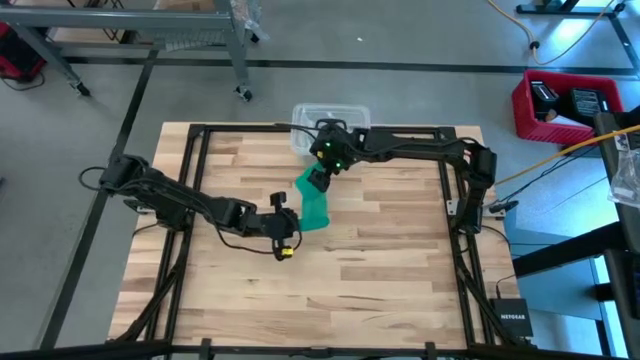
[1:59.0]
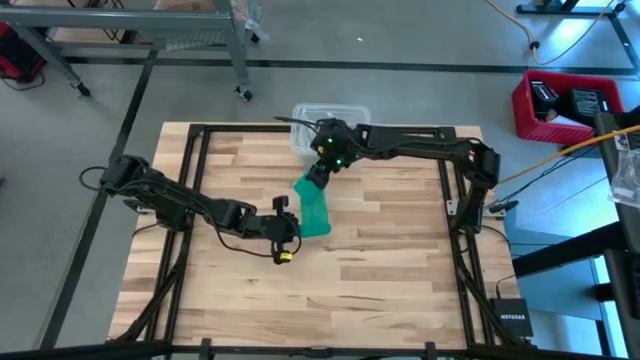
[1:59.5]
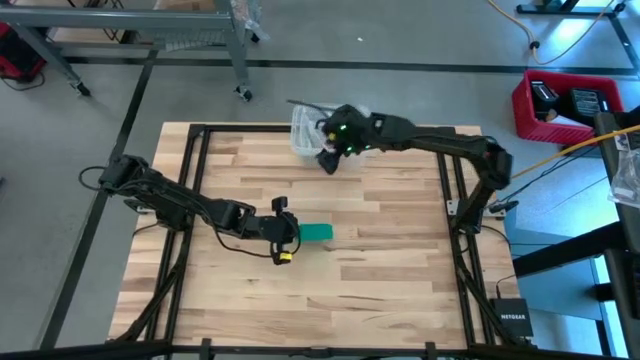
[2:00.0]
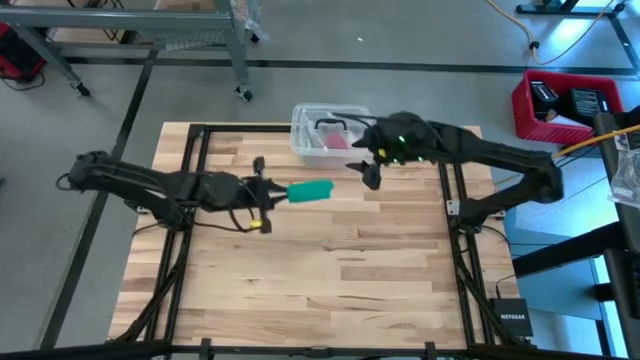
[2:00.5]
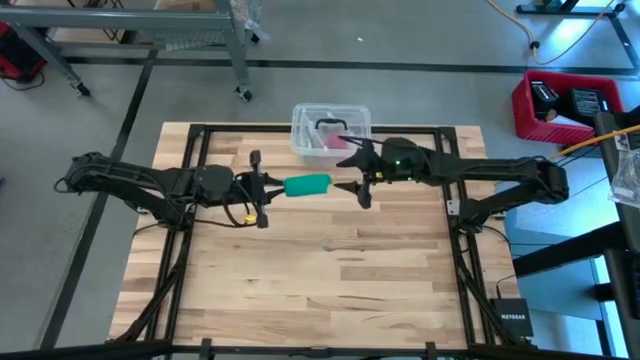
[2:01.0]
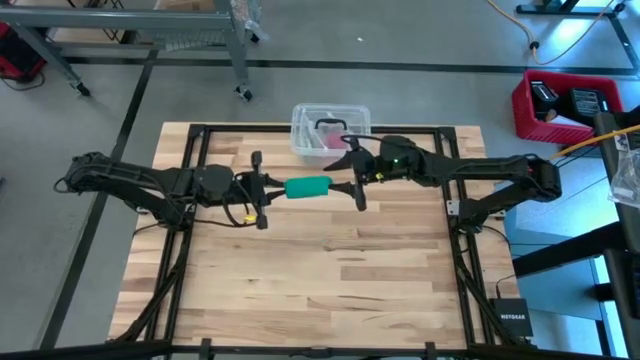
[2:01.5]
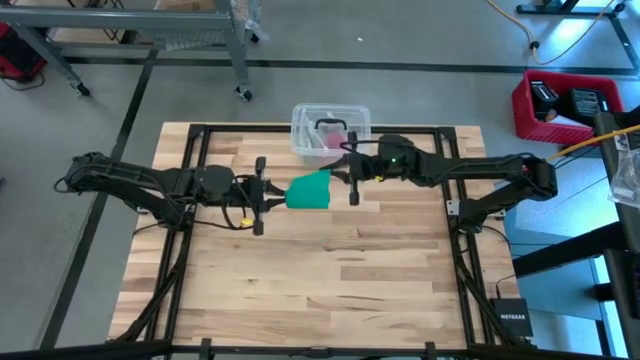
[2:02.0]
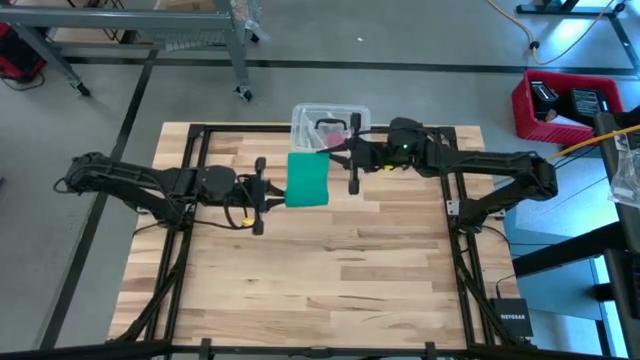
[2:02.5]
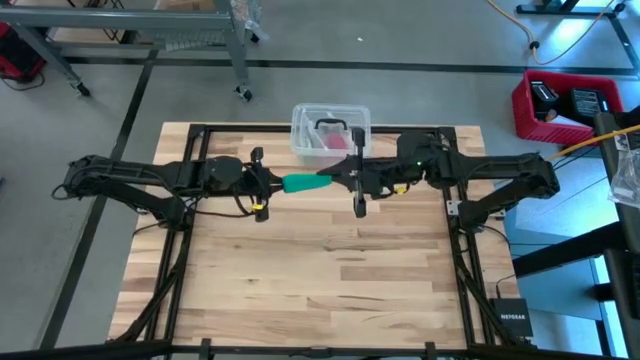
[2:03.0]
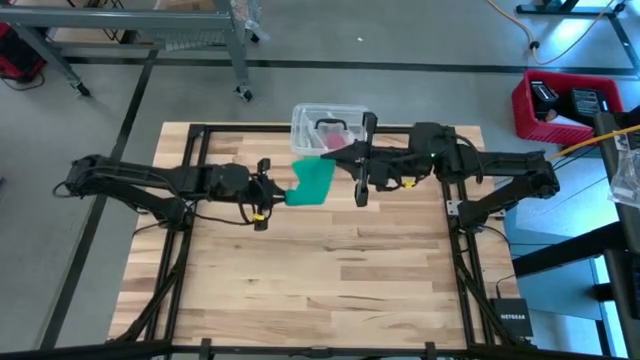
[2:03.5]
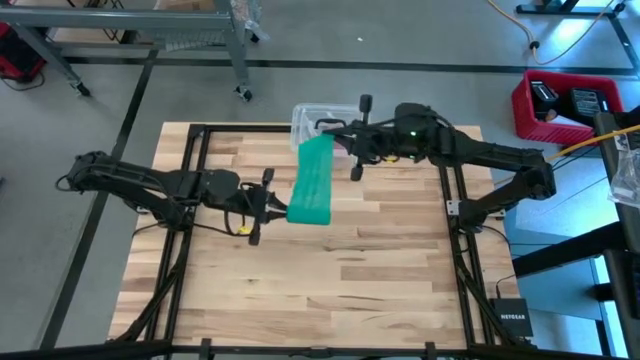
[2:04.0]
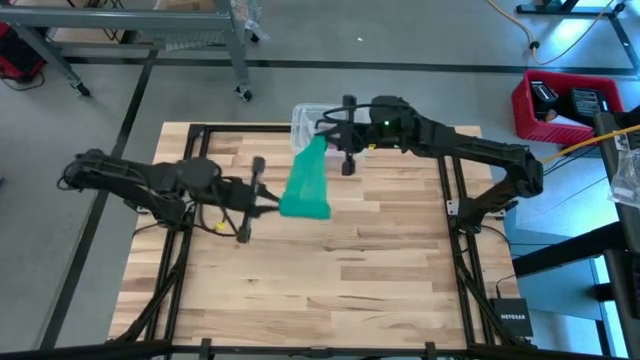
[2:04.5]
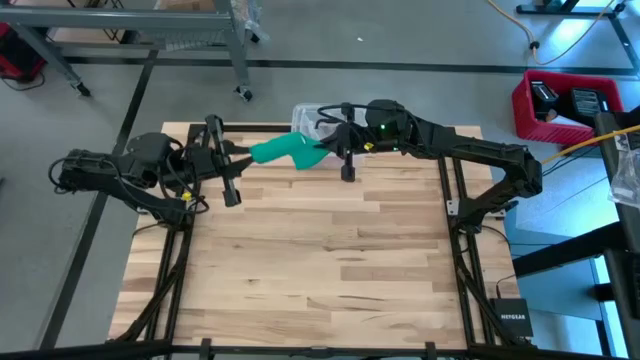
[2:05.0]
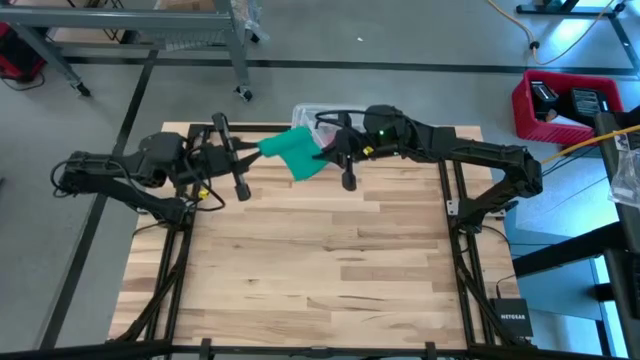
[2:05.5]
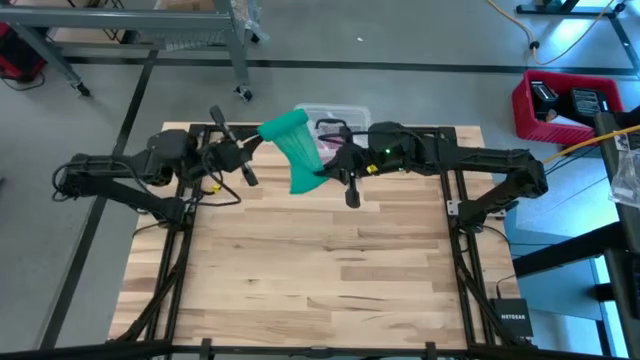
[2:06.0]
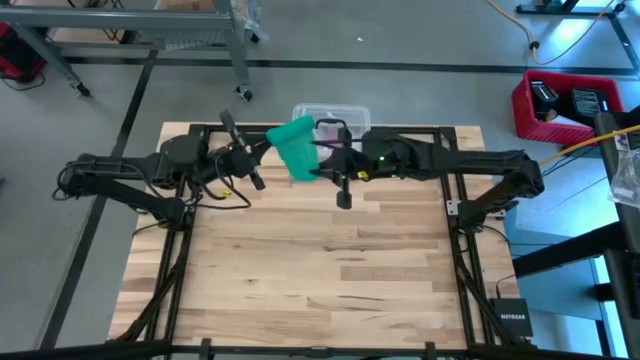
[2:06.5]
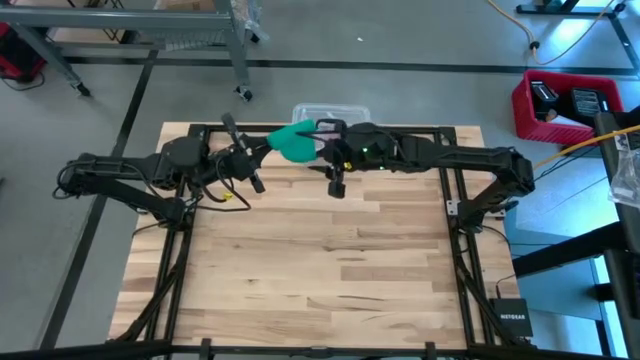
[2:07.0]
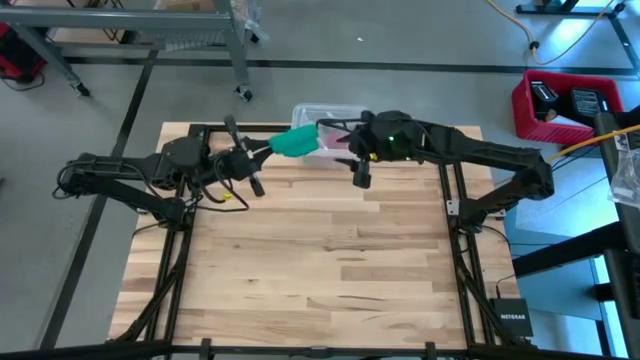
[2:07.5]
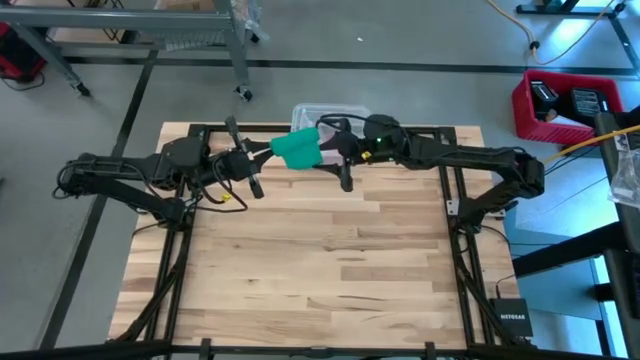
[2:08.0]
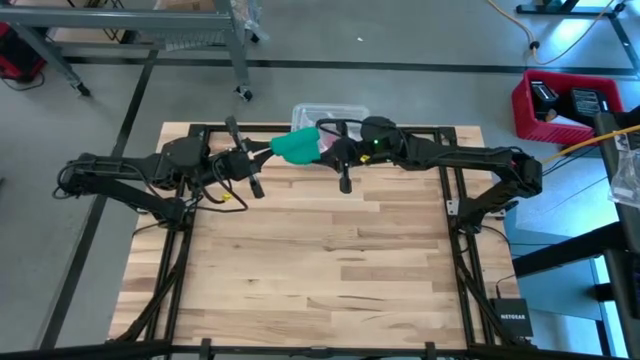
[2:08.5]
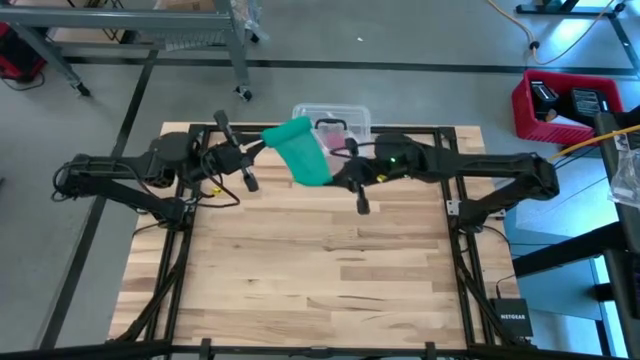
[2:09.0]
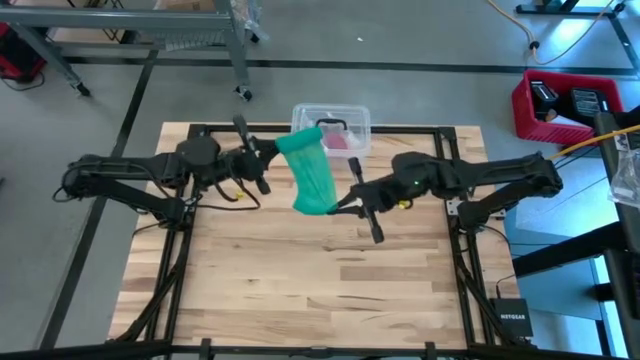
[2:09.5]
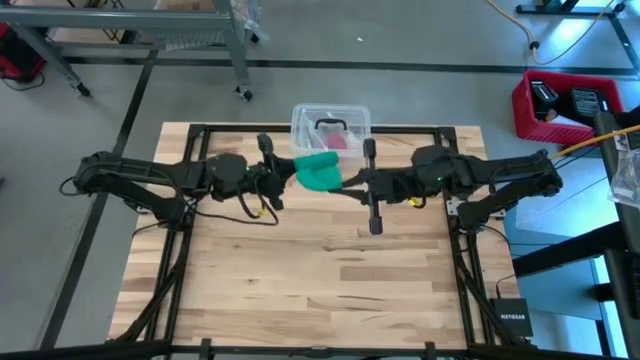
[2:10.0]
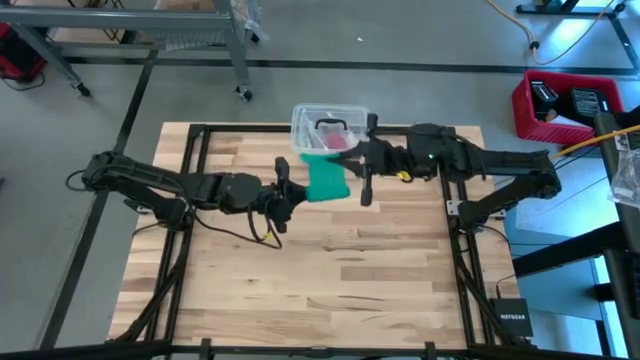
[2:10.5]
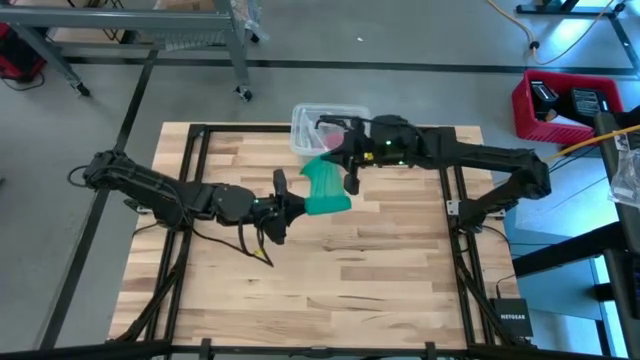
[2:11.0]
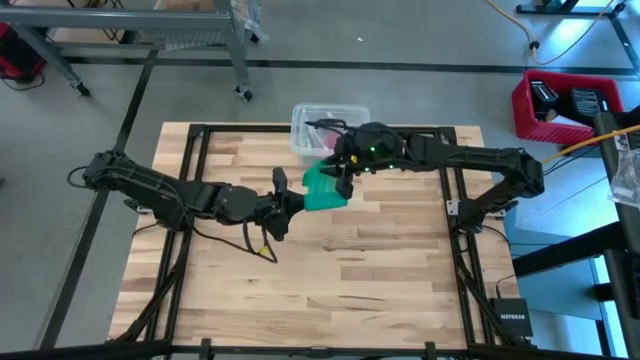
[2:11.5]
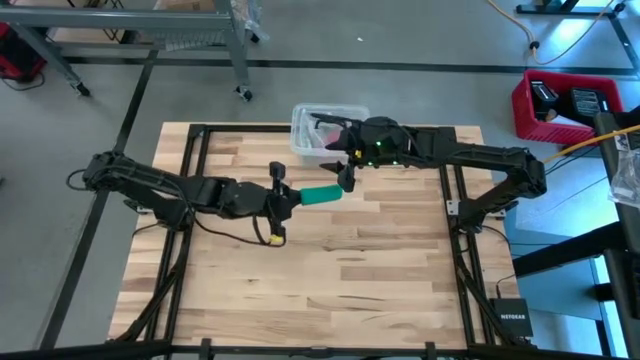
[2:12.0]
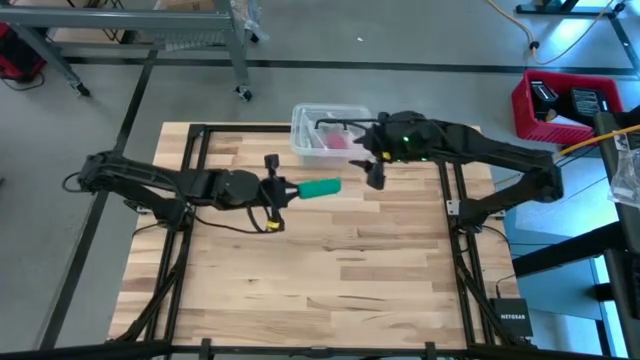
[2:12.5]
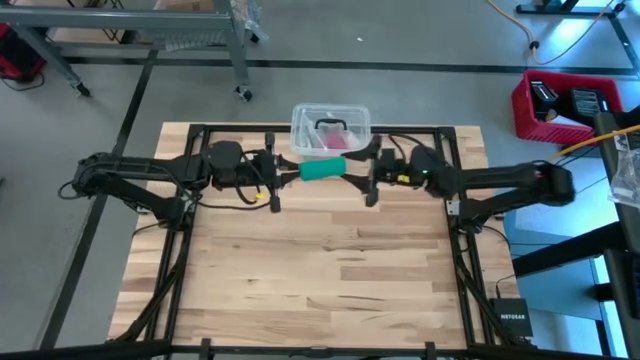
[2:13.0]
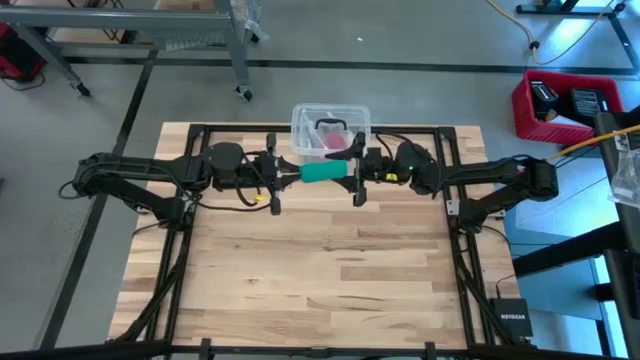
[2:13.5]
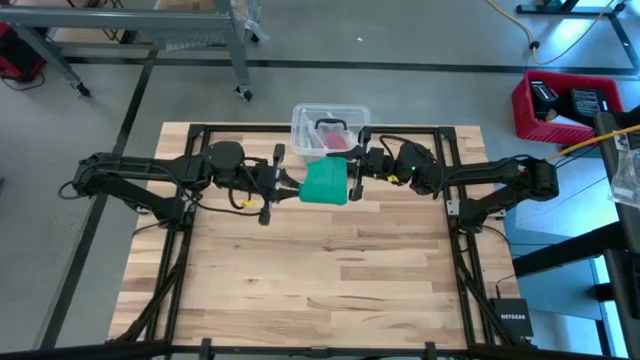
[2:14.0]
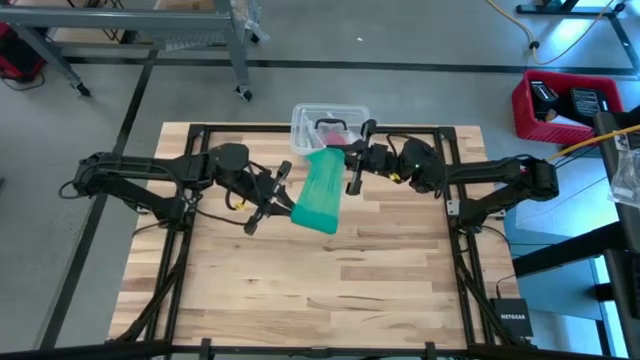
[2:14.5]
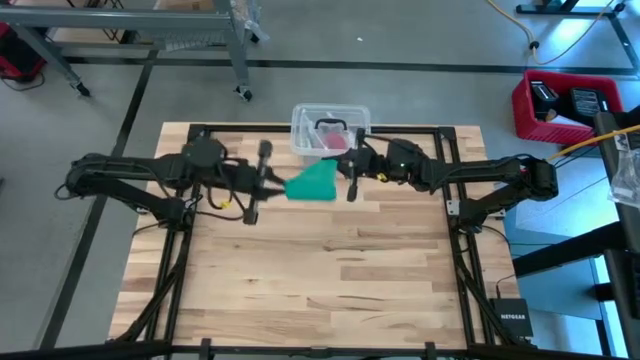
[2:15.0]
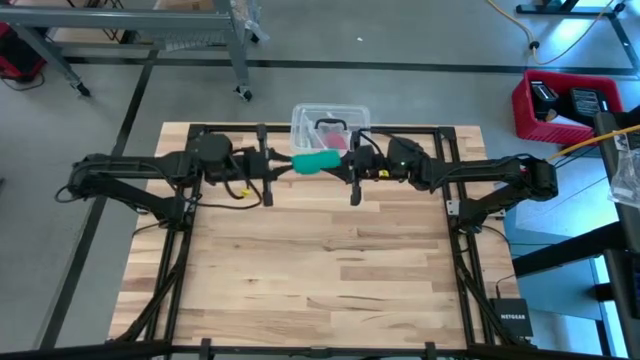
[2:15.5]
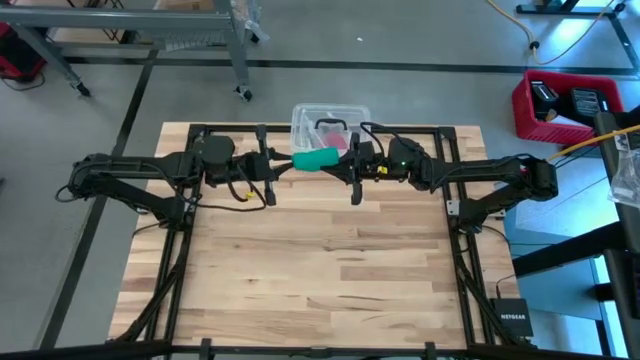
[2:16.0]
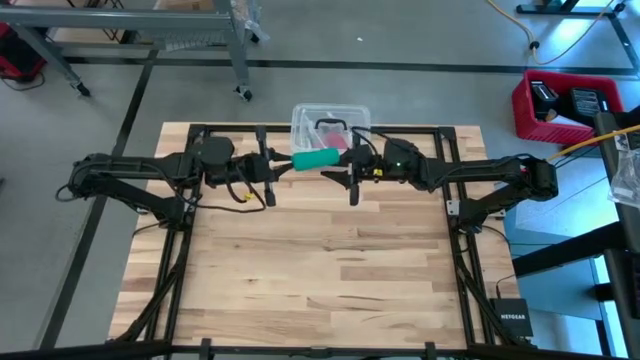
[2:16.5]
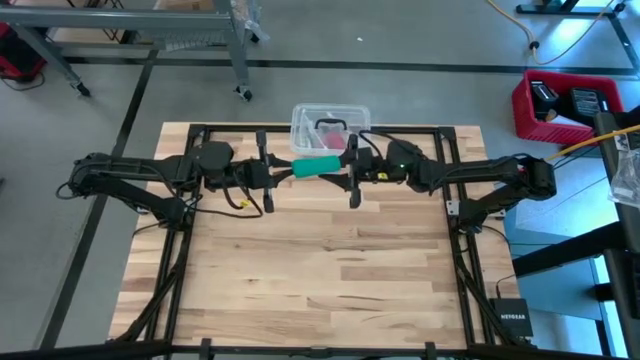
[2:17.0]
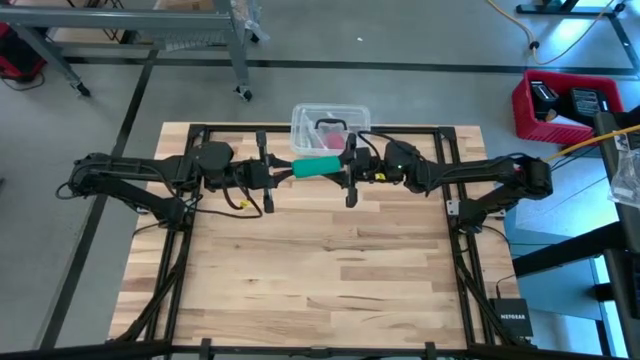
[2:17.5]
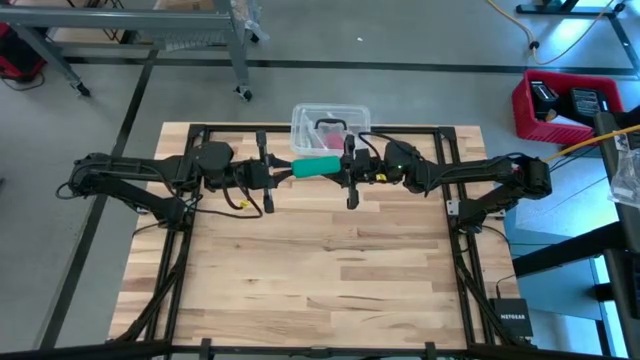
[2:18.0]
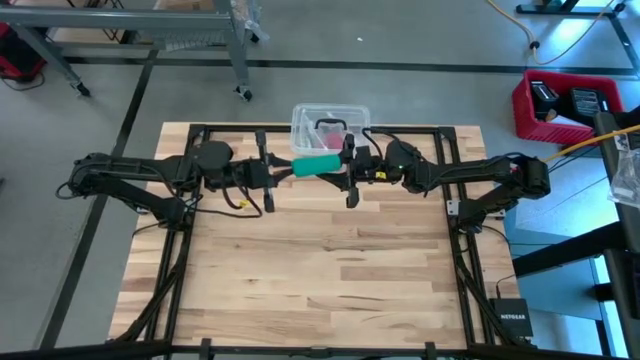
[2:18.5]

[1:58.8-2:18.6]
Task: Roll bandage
Roll the green bandage

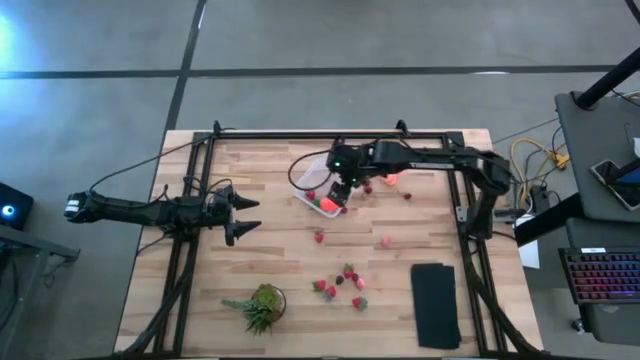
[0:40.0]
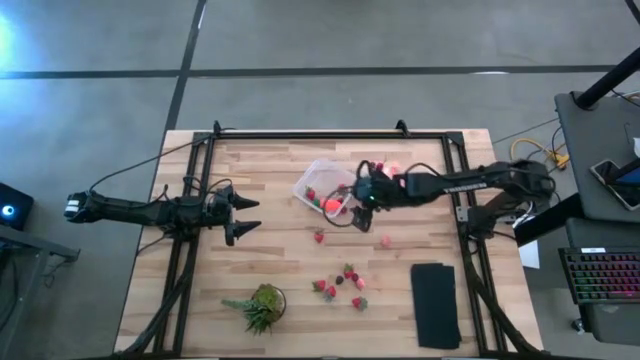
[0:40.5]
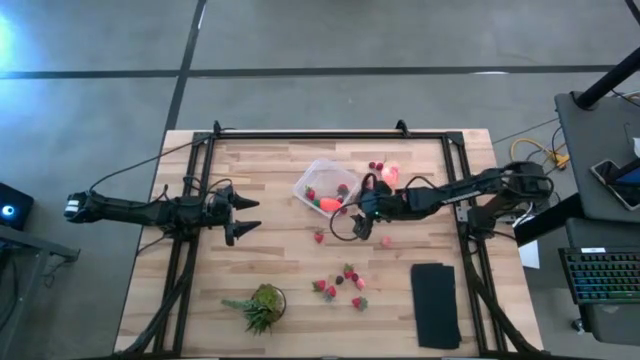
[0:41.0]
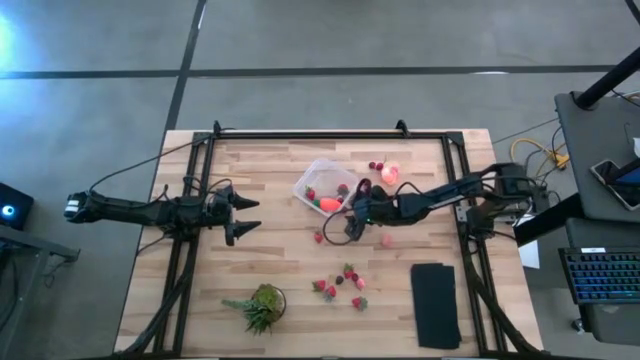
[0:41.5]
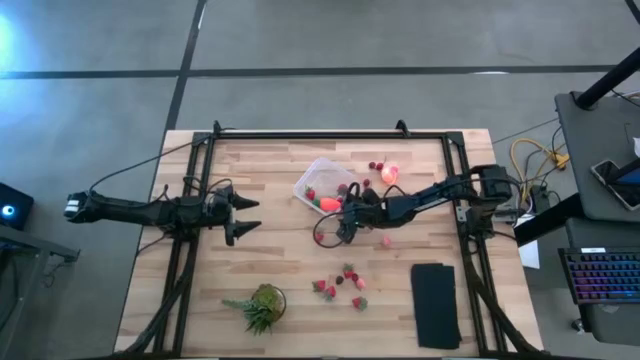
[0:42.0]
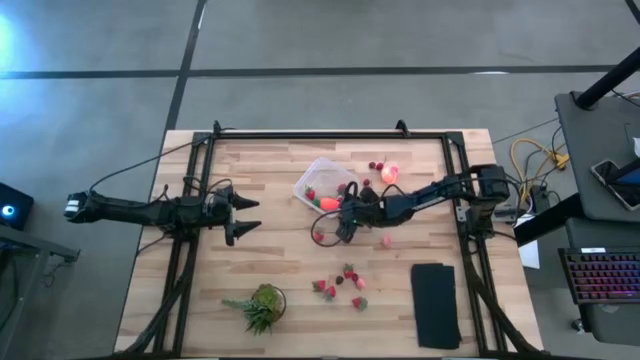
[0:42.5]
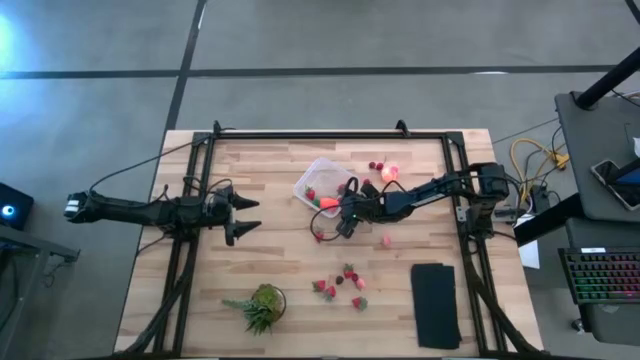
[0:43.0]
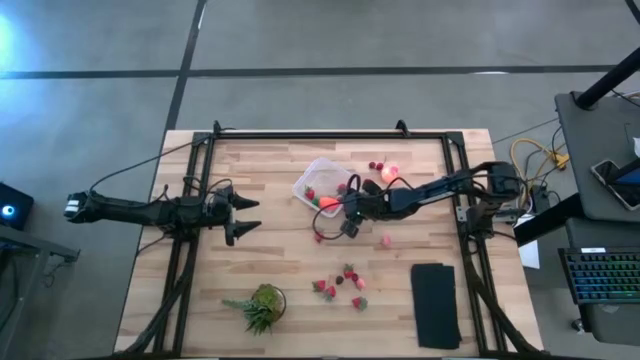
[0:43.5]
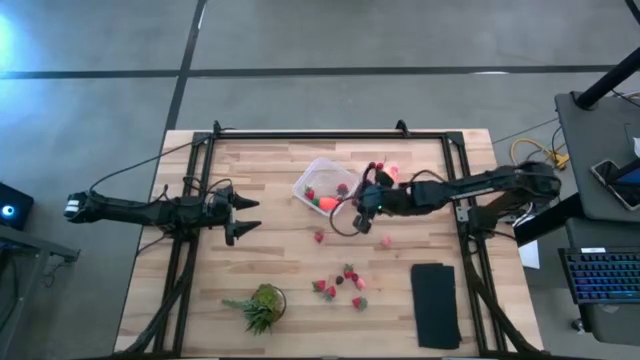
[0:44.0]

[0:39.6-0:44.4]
Task: Pick and placing Produce into tupperware
Put the red cherry into the transparent bin
